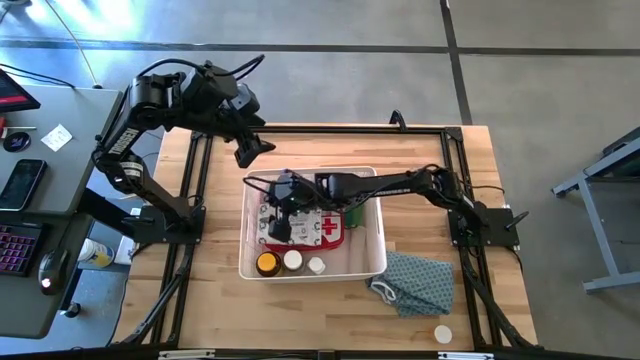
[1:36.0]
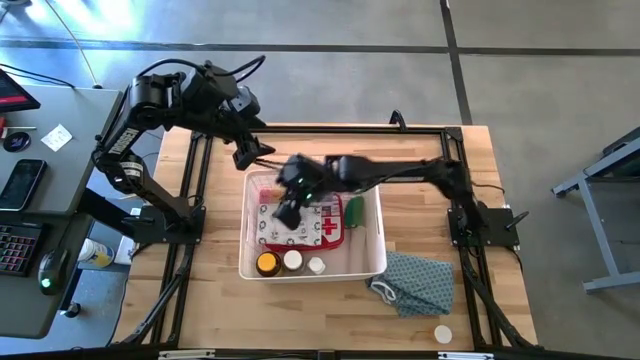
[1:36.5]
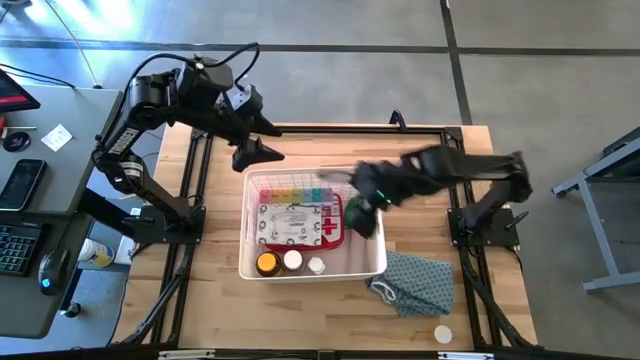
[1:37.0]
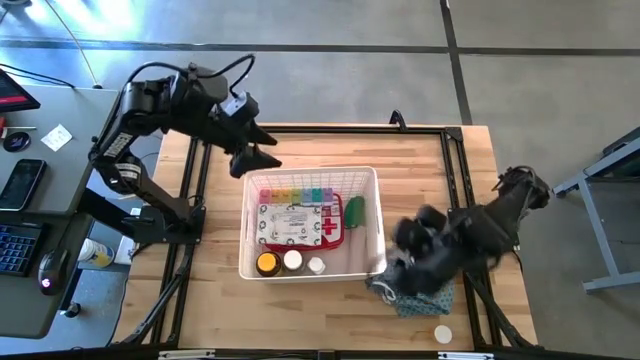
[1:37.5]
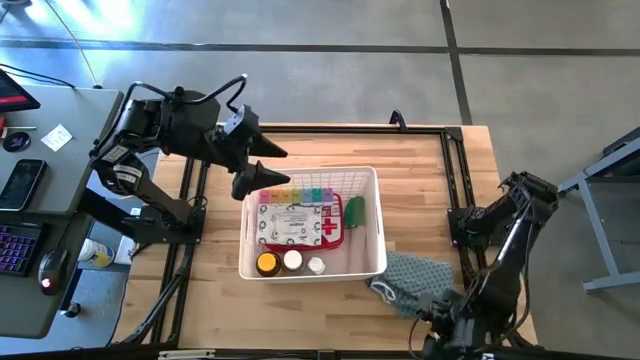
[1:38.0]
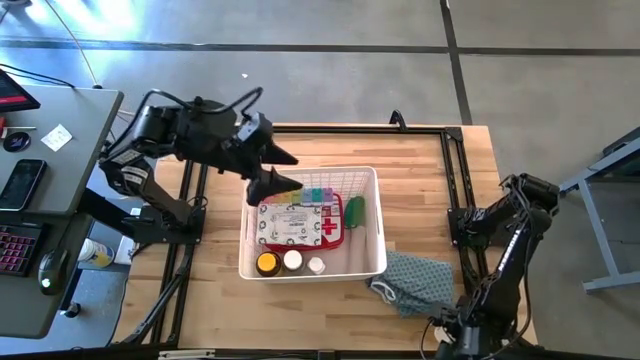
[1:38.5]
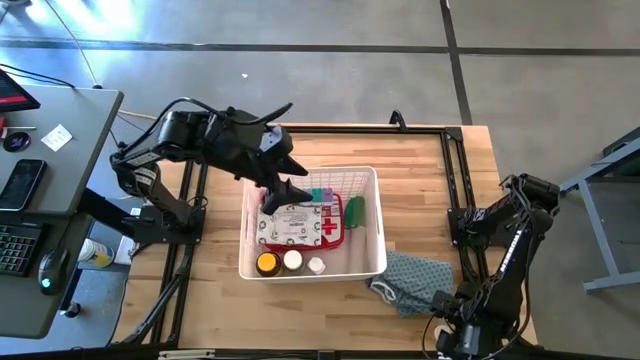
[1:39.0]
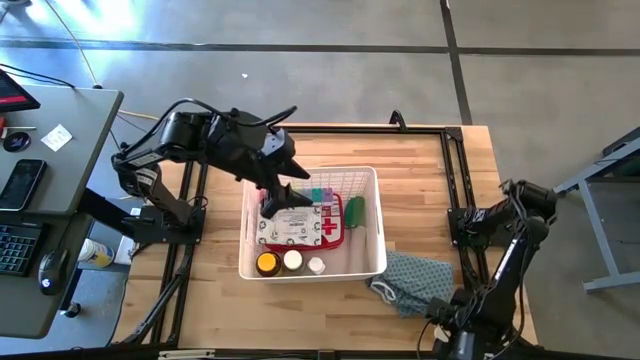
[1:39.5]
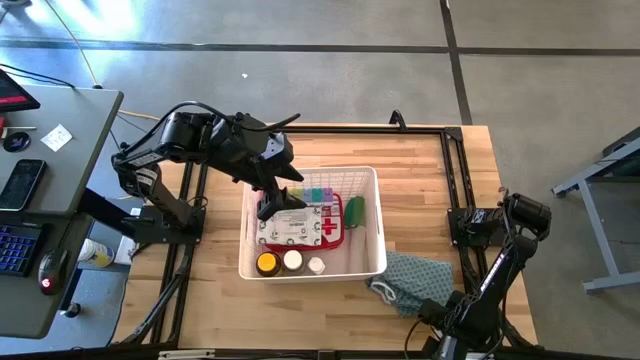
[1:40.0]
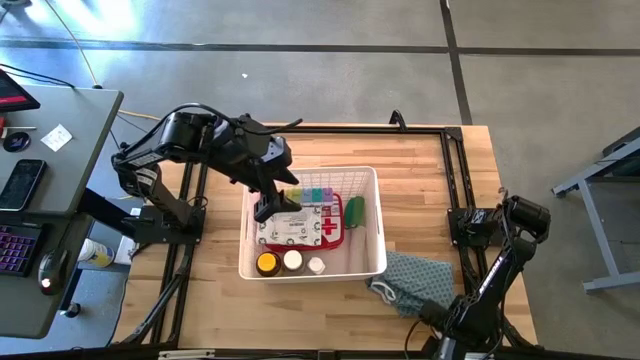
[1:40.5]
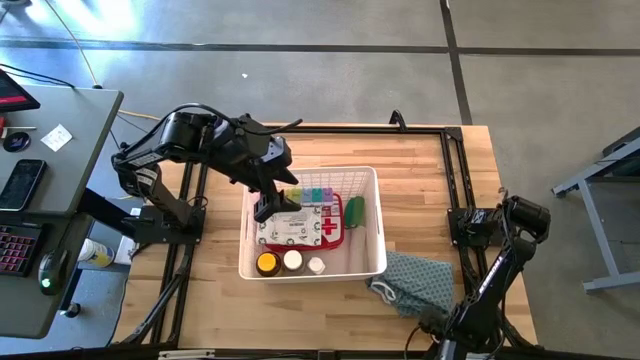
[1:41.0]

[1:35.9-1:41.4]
Task: Pick & place medical supplies in basket/bin
Put the orange pill bottle into the white container

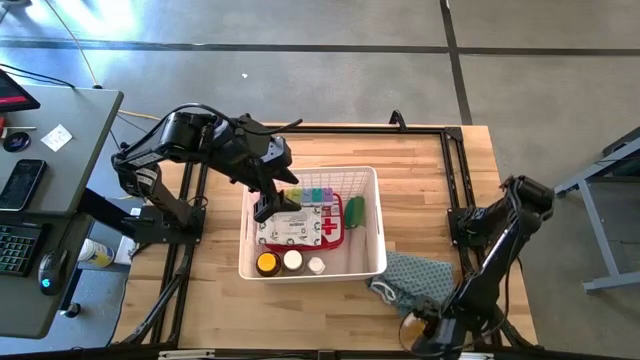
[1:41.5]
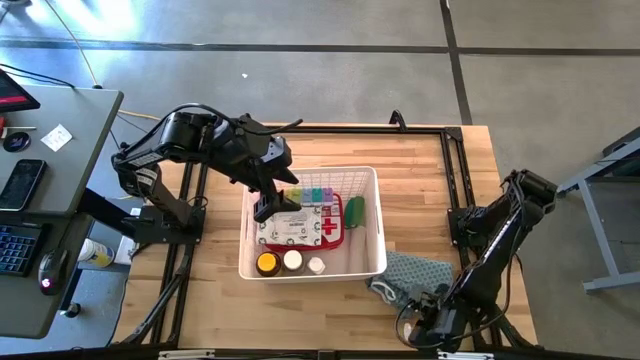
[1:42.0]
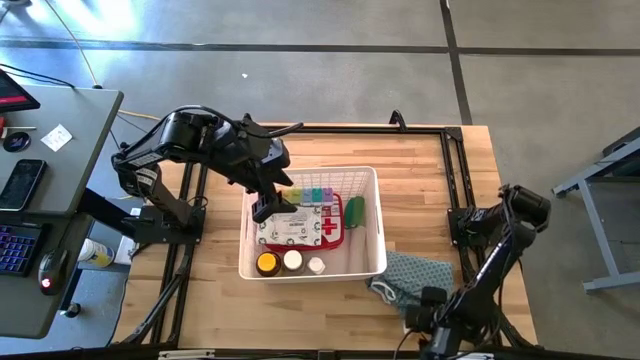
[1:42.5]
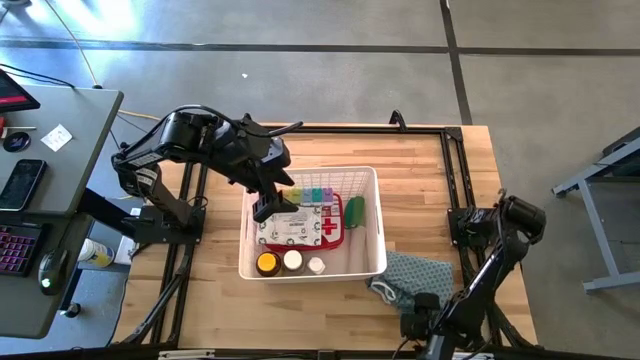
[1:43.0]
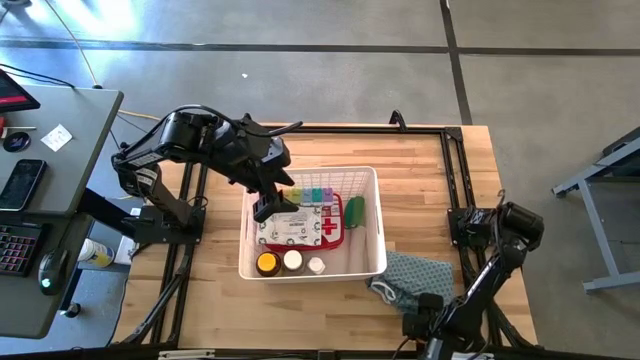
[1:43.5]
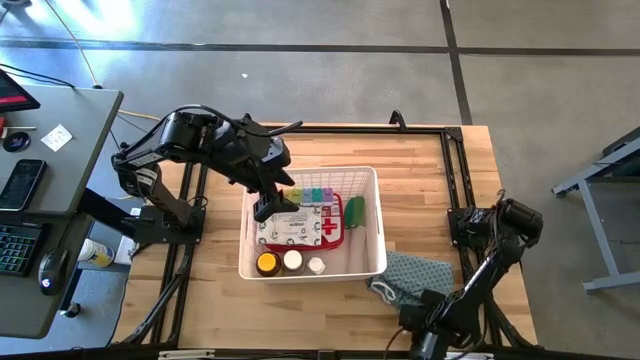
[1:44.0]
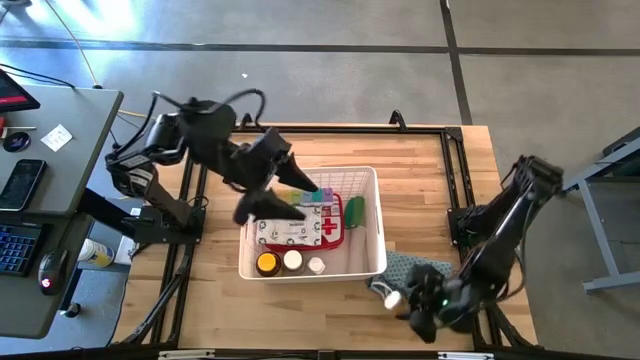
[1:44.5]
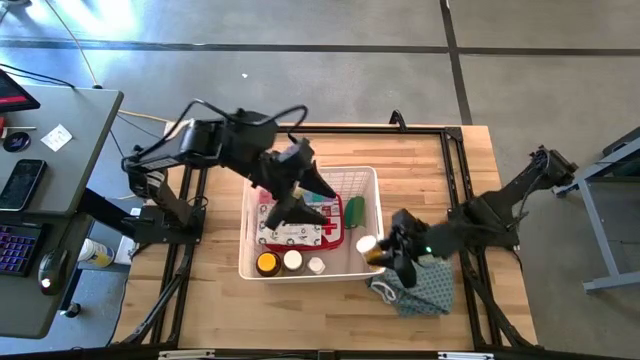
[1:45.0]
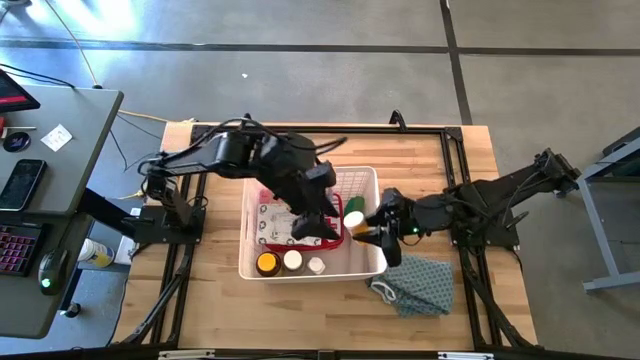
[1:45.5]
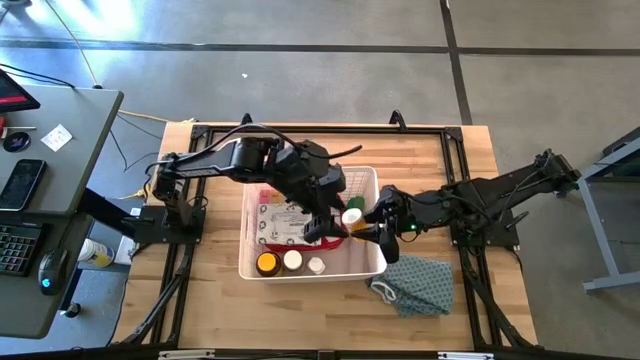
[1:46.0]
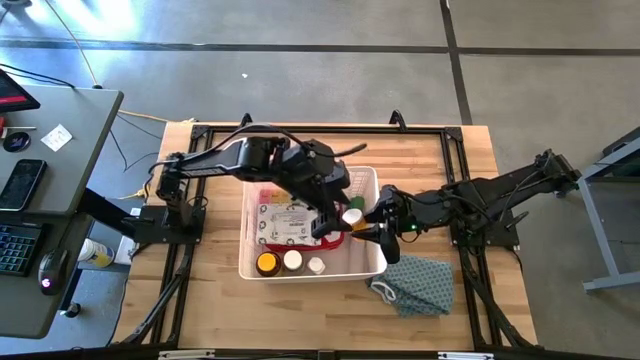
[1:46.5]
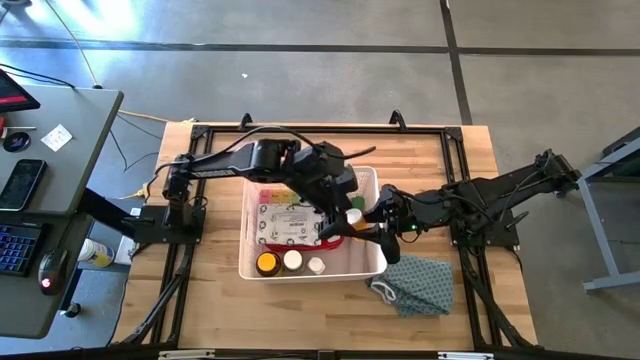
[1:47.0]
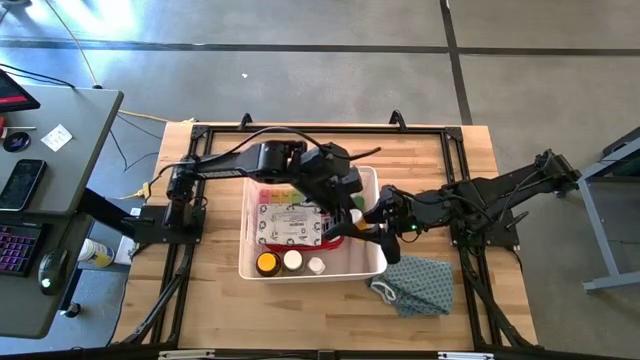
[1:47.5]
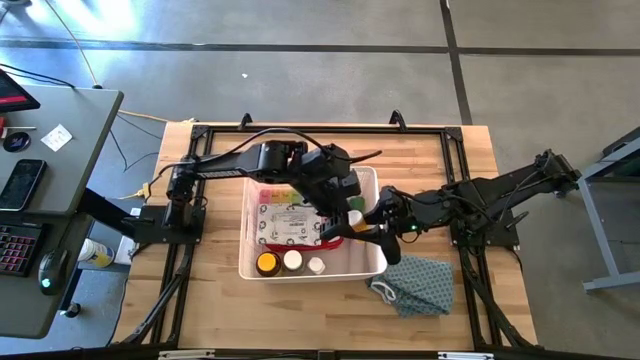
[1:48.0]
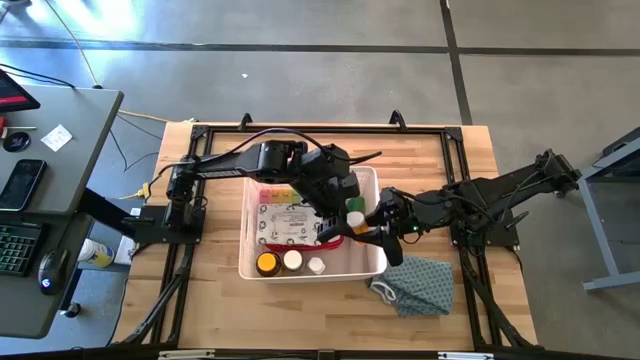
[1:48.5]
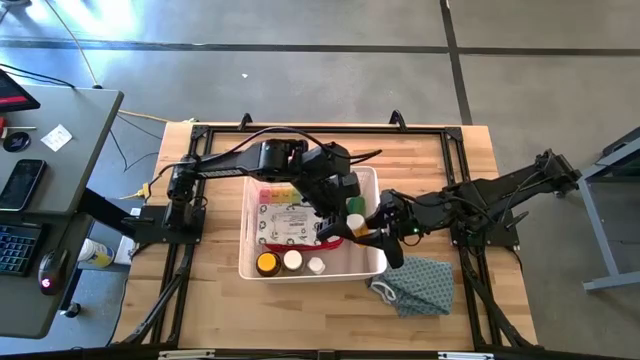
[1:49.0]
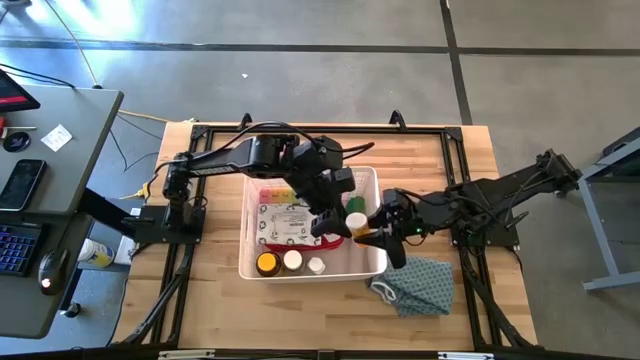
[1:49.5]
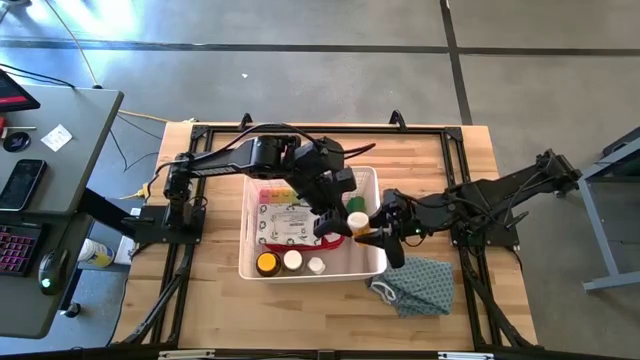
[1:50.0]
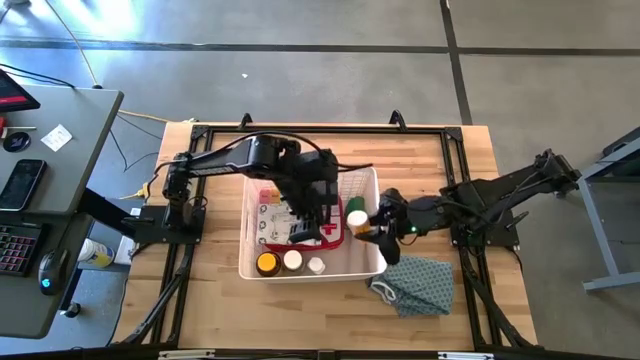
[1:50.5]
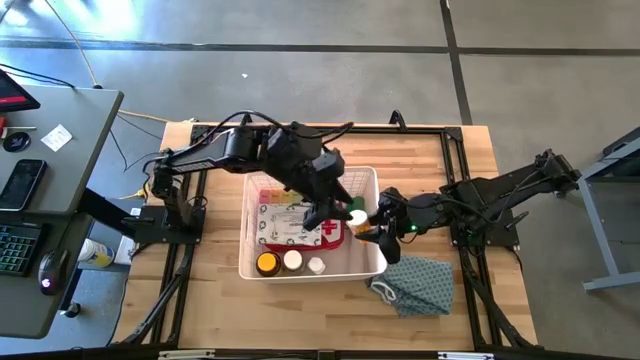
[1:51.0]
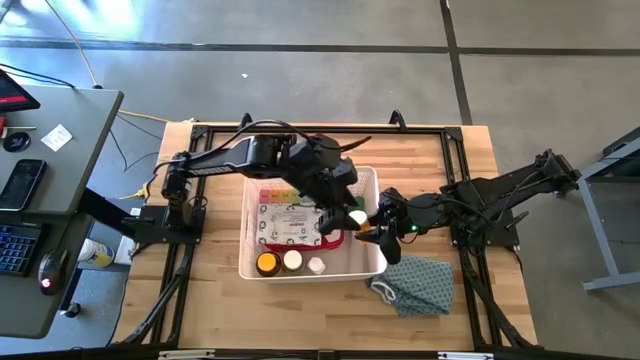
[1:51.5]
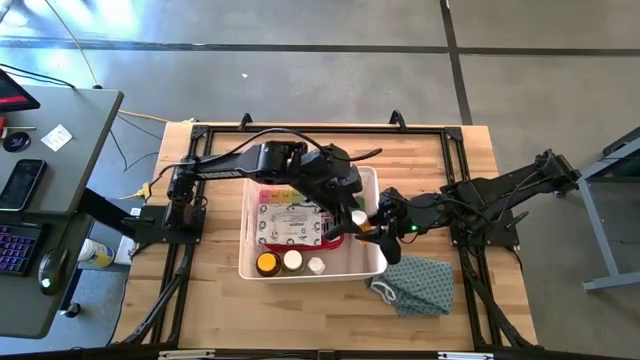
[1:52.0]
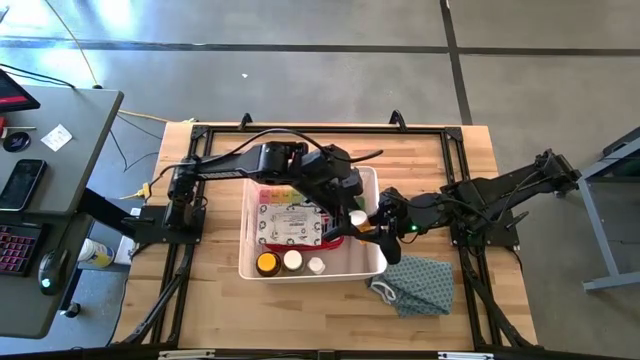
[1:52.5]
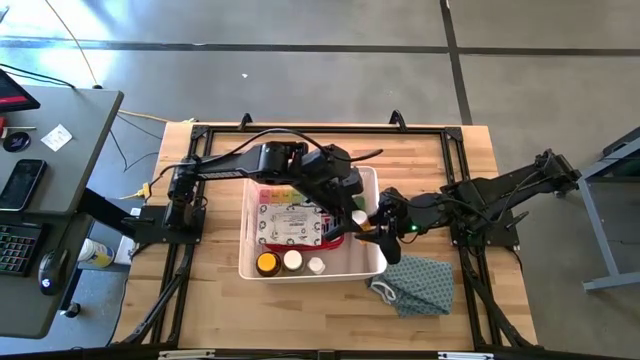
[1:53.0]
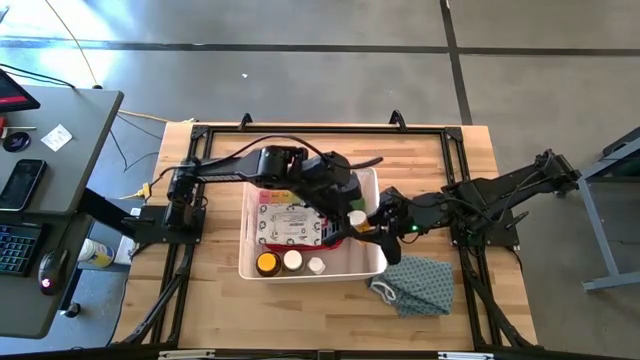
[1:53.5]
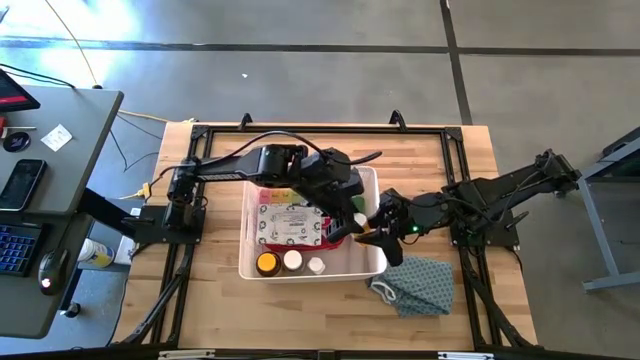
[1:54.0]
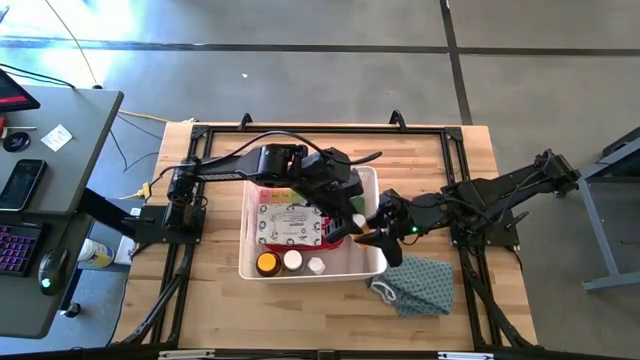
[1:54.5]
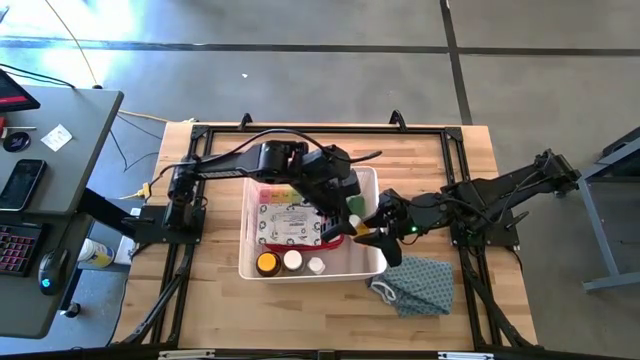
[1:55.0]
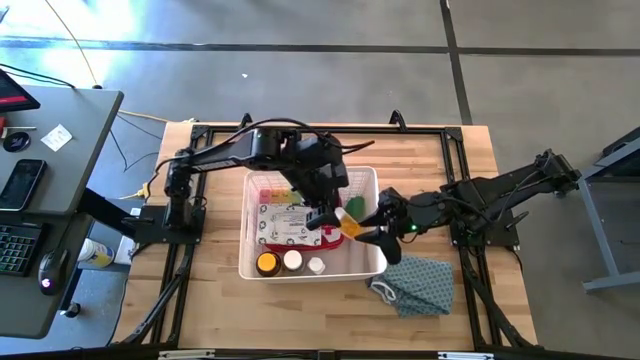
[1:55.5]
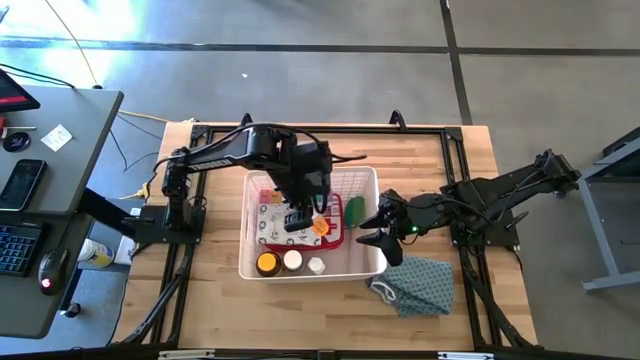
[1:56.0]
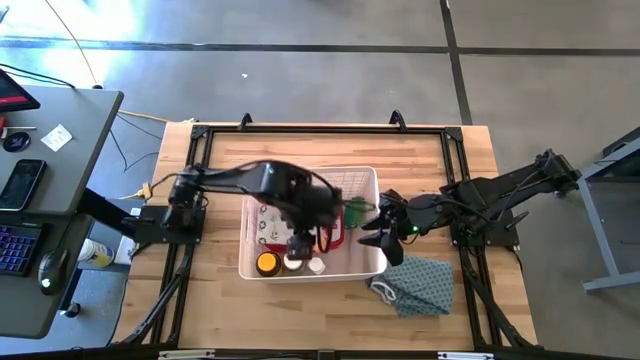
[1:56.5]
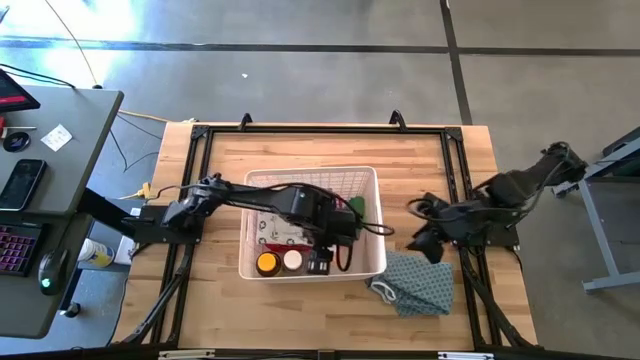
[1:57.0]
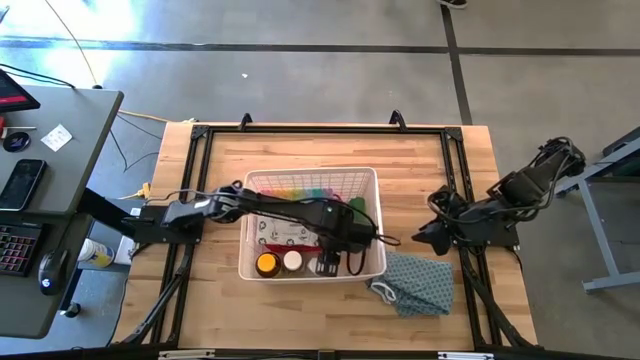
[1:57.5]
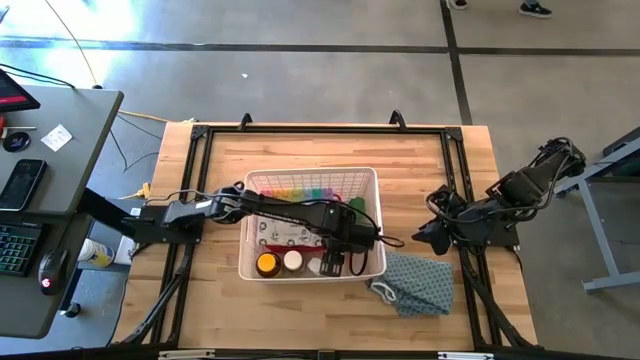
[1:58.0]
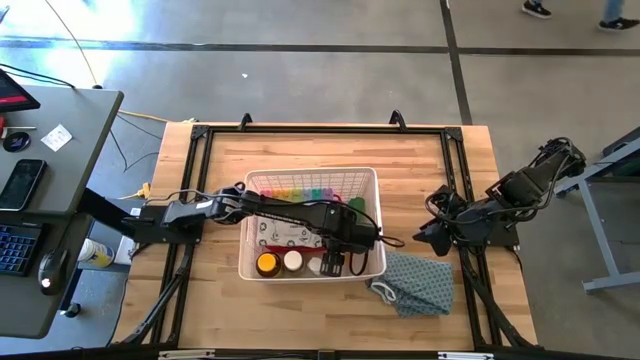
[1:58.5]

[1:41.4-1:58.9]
Put the orange pill bottle into the white container
